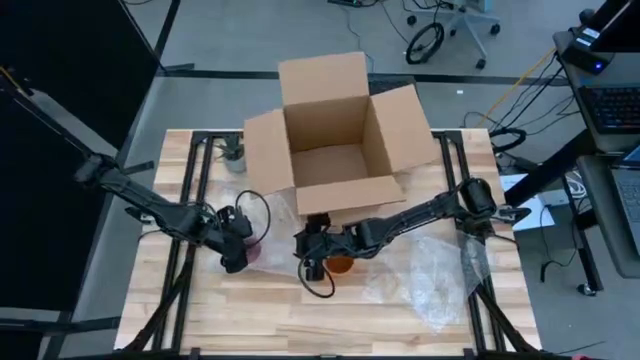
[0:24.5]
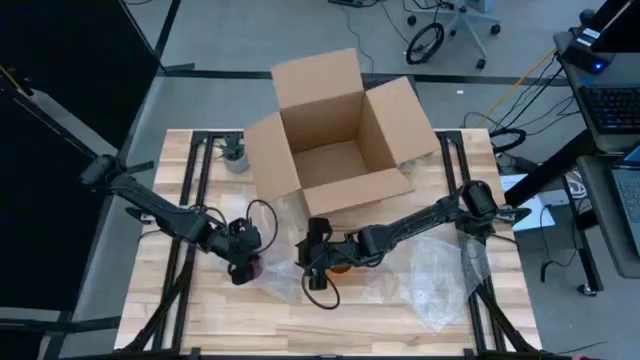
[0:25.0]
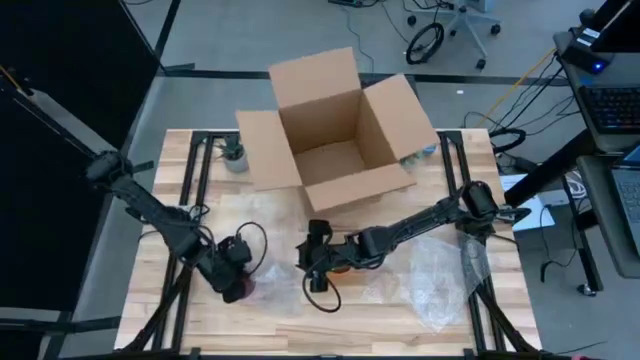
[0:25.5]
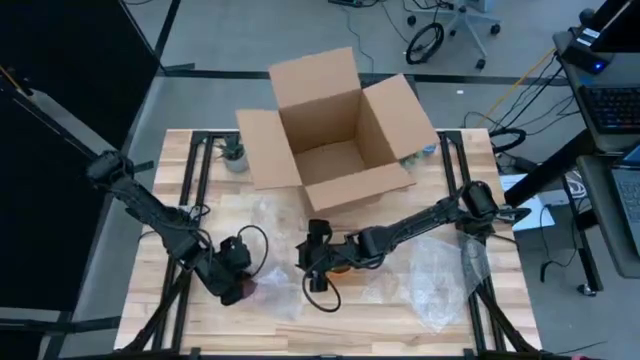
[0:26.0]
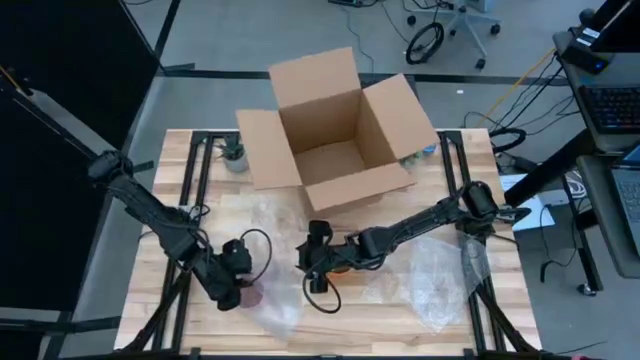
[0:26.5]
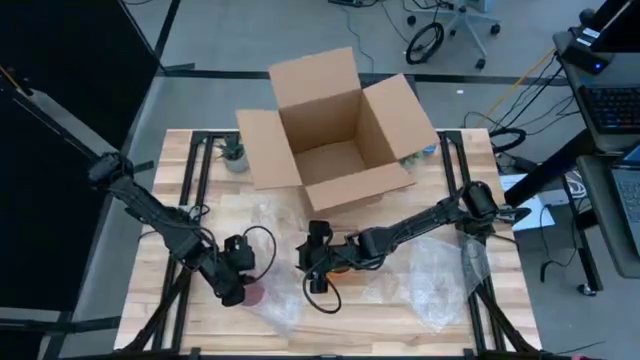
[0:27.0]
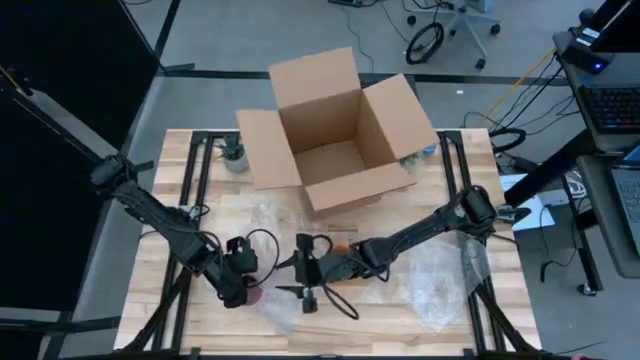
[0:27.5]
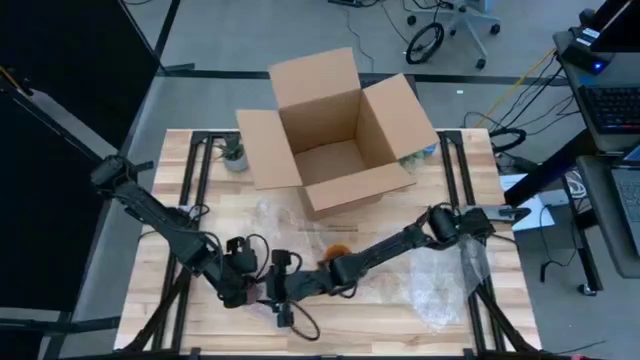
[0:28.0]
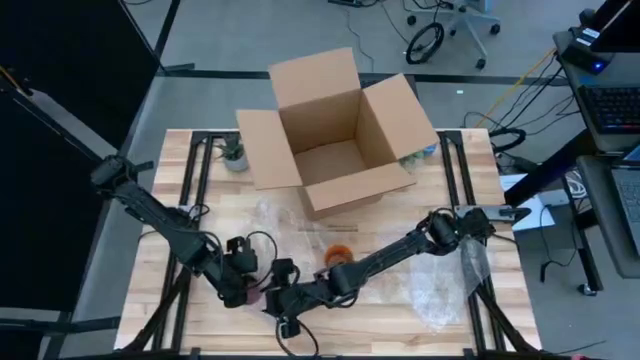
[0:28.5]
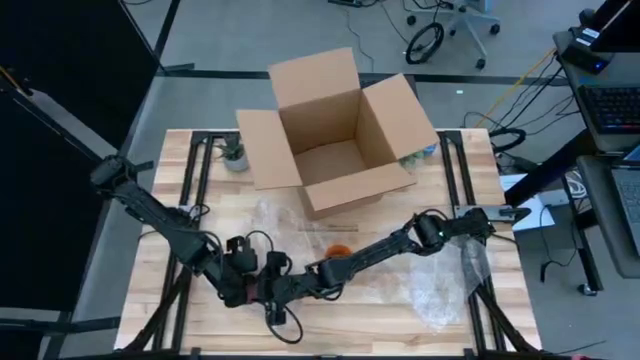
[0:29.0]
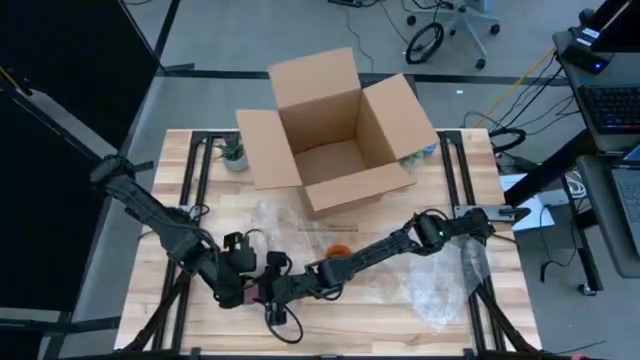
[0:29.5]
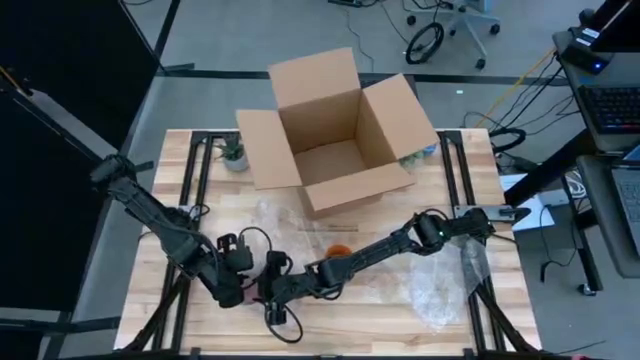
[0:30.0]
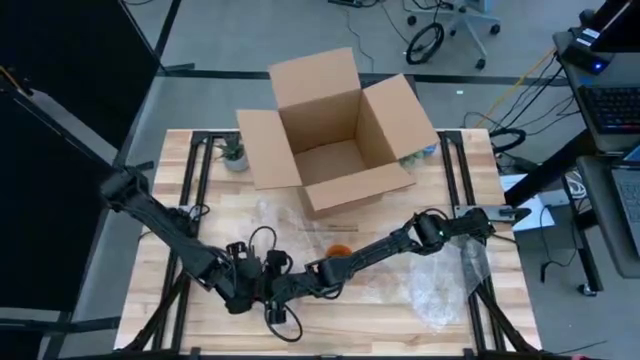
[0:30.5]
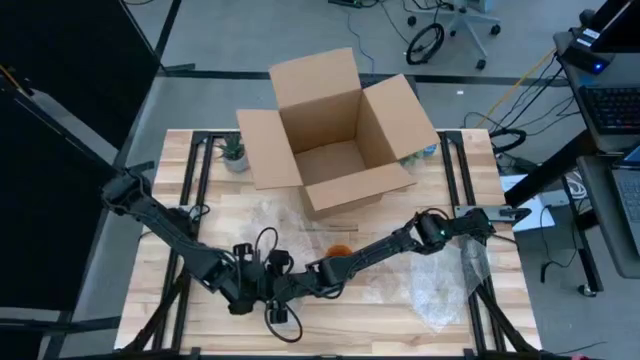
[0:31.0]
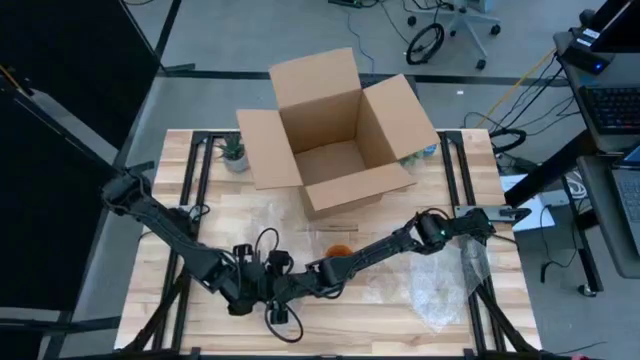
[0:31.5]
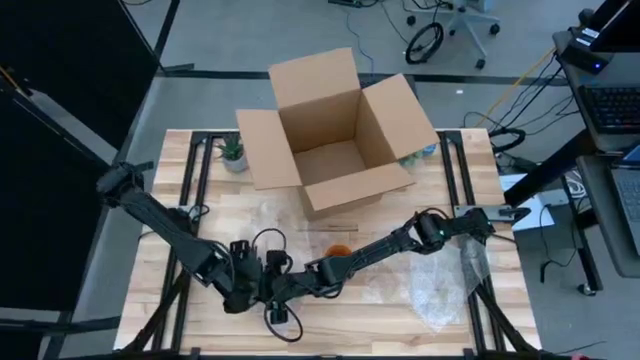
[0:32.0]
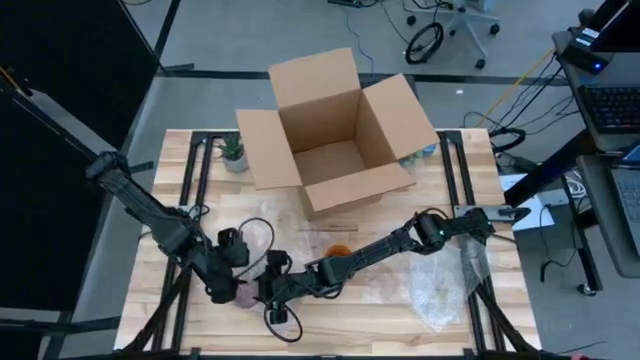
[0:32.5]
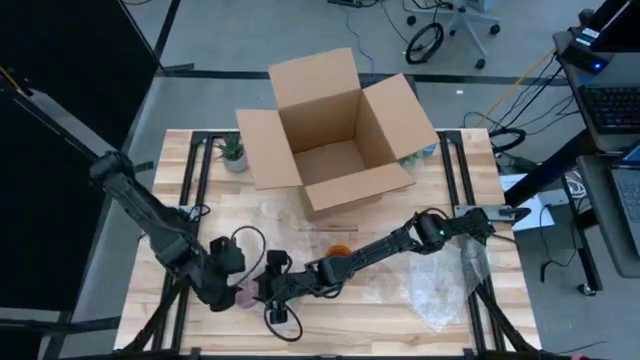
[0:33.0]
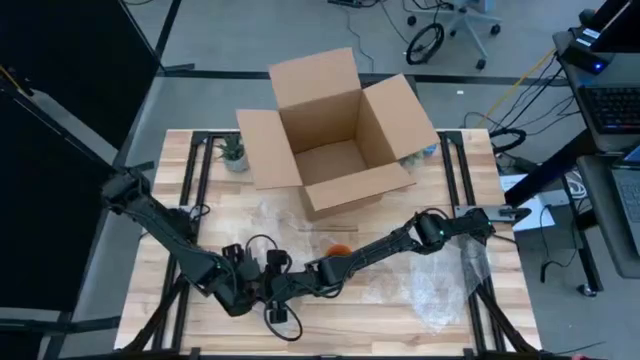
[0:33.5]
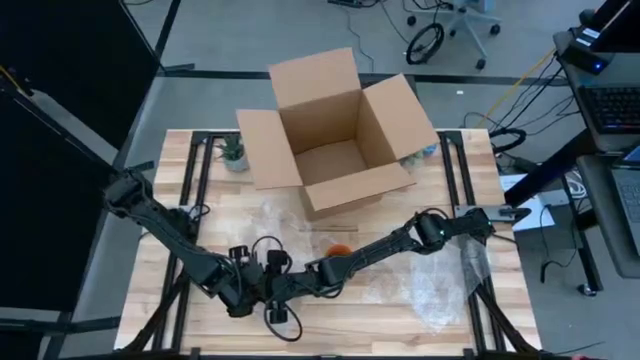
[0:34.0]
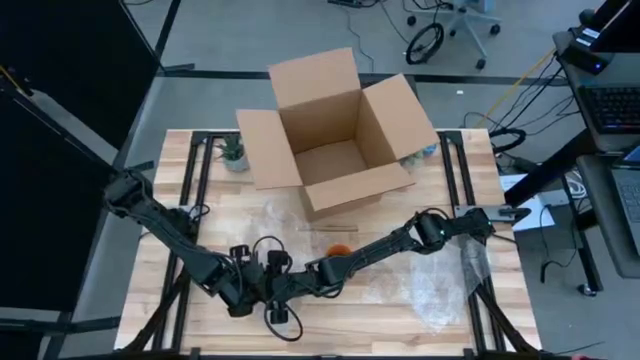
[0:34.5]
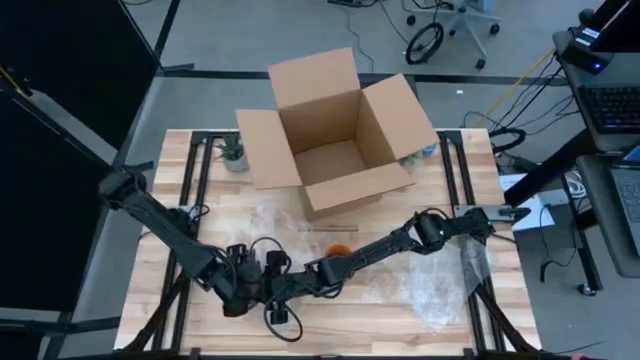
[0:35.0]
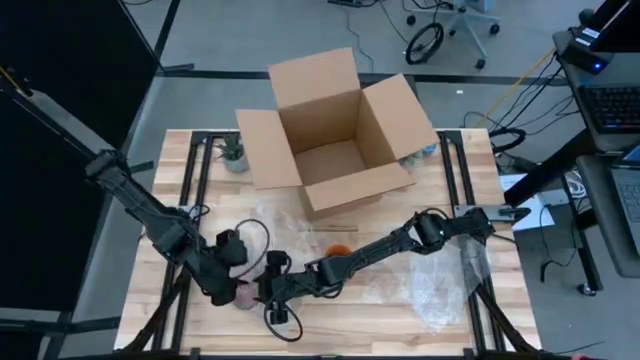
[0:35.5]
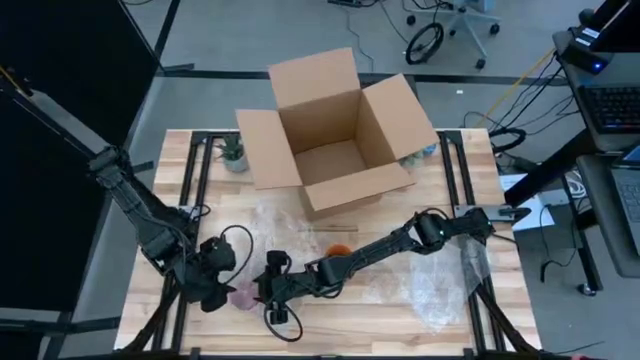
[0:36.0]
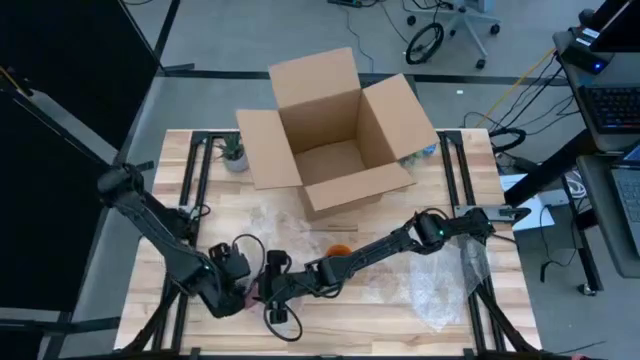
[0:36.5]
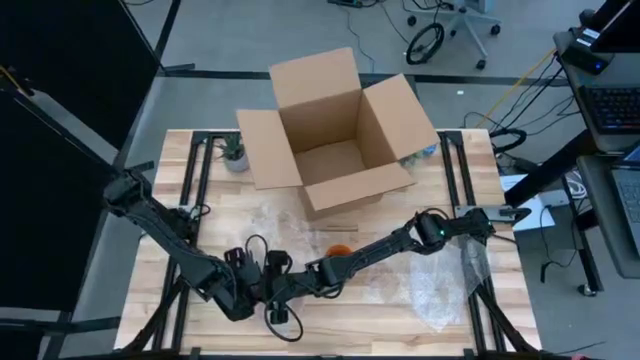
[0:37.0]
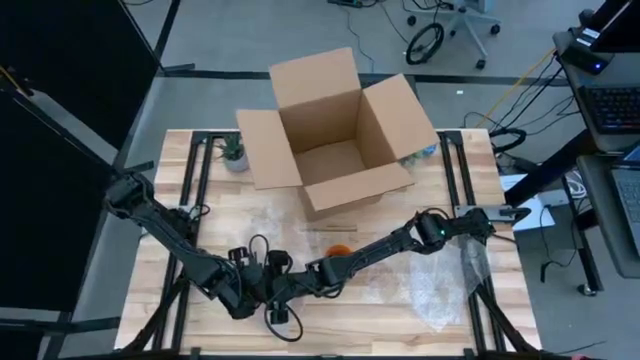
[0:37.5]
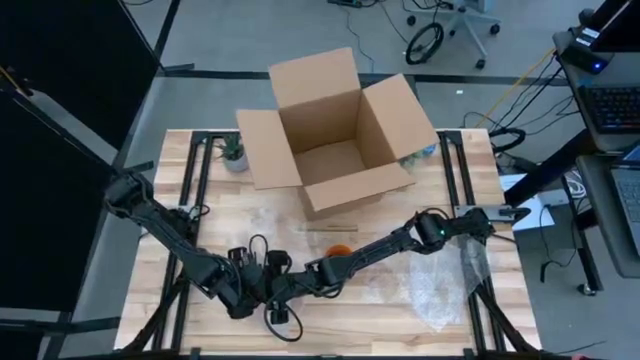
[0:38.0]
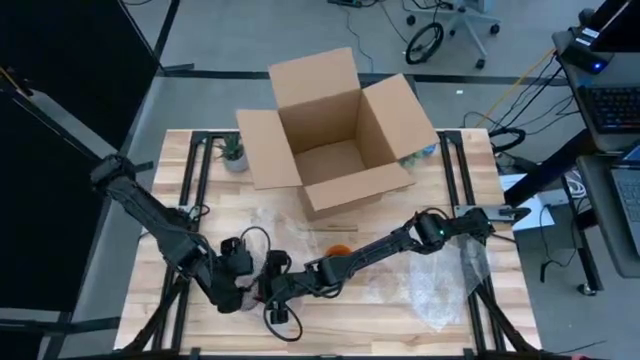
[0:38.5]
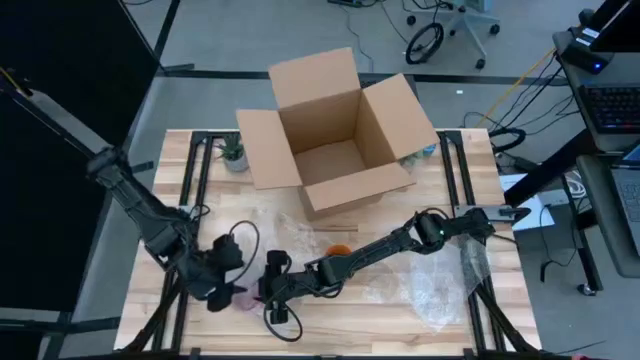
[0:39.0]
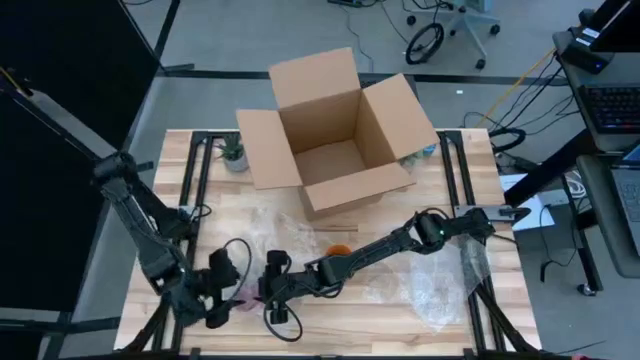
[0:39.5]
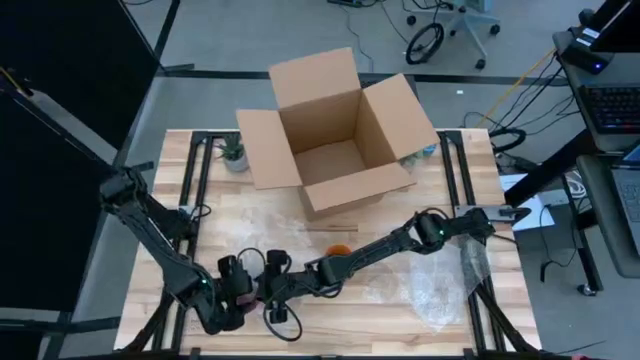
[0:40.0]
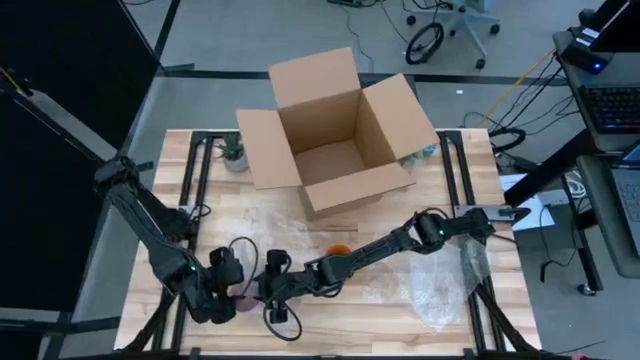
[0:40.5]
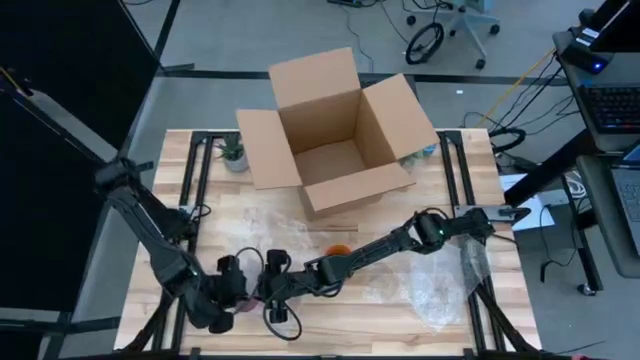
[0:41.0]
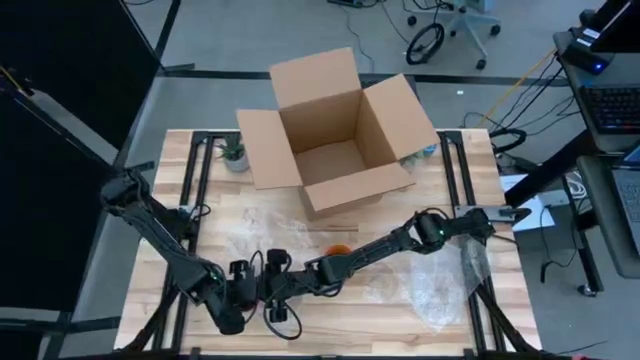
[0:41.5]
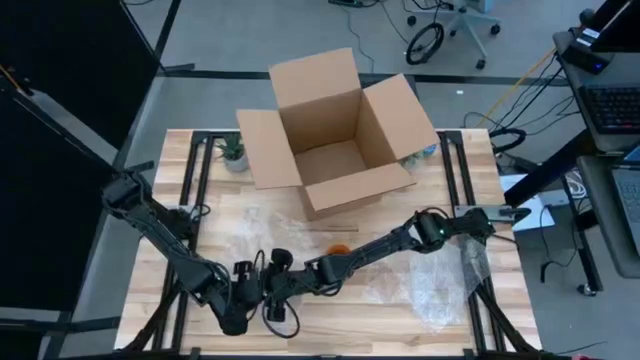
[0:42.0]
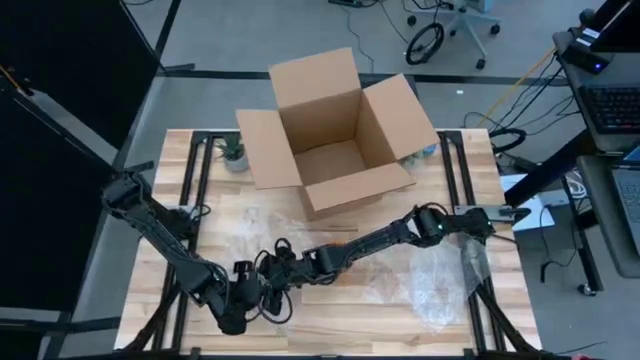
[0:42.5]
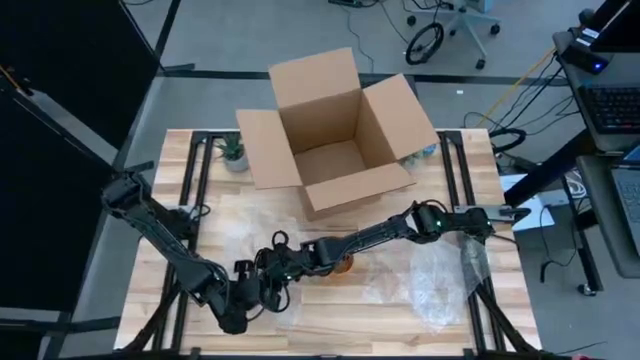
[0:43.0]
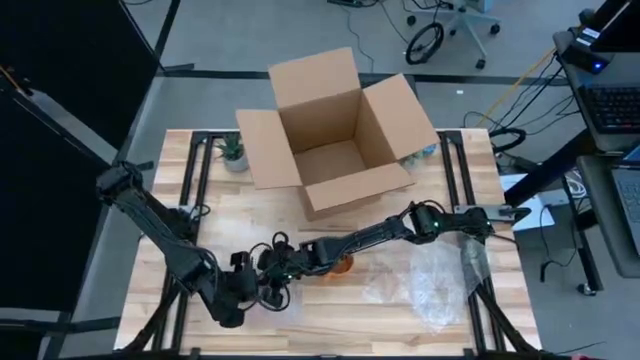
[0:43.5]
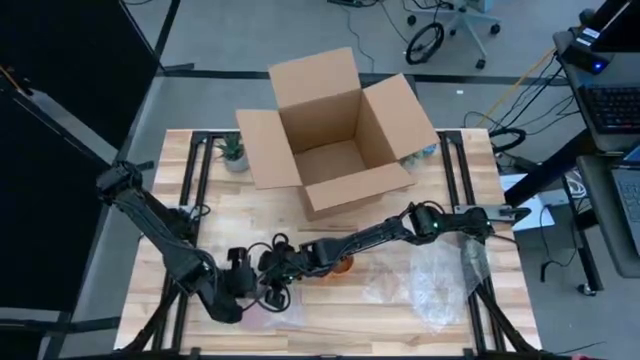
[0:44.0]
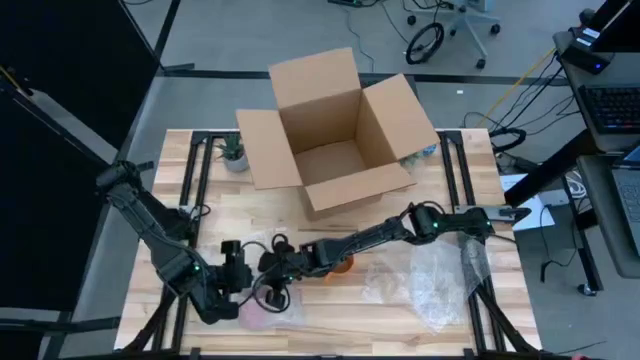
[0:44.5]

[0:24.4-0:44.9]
Task: wrap mug
Wrap the pink mug with transparent bubble wrap
